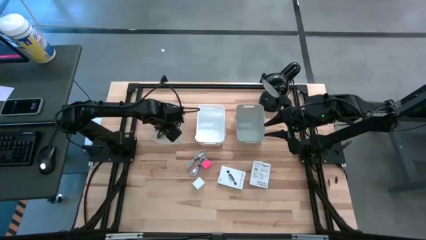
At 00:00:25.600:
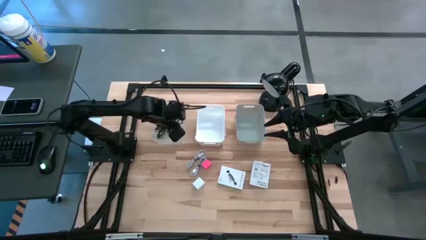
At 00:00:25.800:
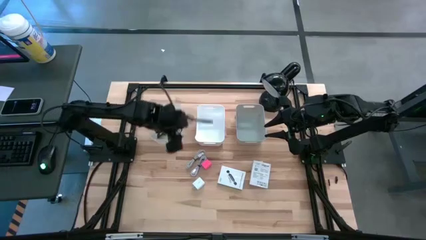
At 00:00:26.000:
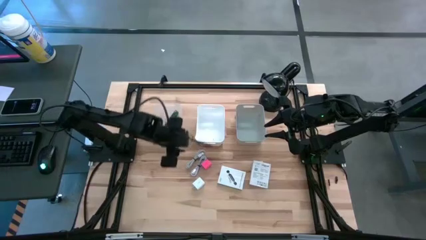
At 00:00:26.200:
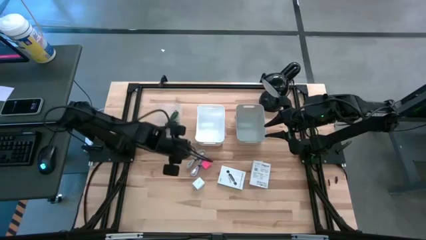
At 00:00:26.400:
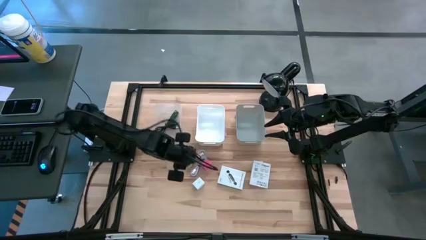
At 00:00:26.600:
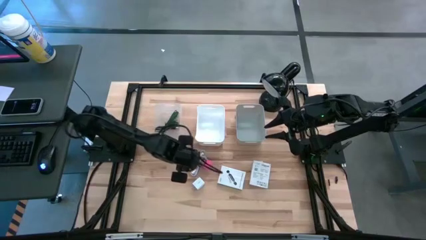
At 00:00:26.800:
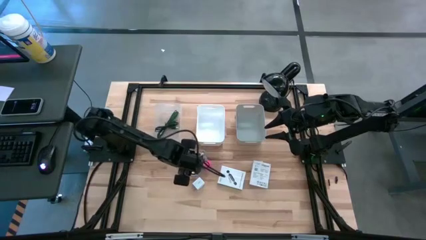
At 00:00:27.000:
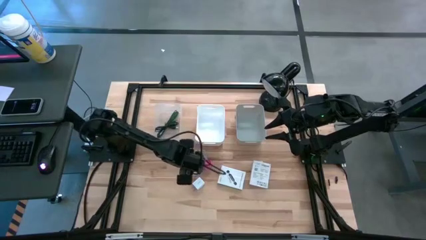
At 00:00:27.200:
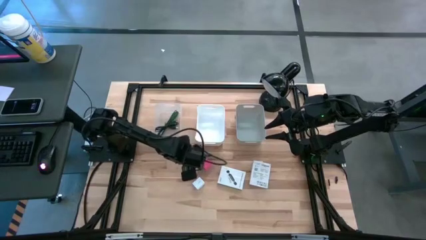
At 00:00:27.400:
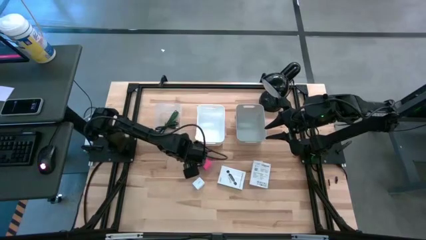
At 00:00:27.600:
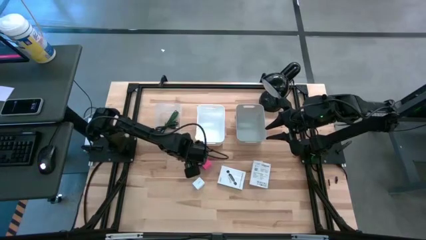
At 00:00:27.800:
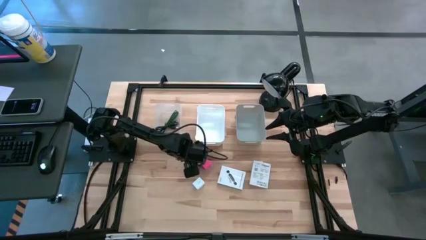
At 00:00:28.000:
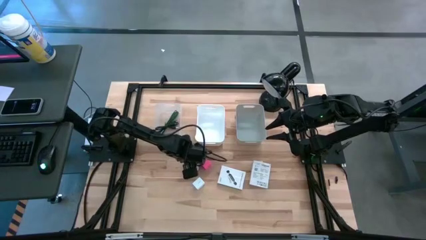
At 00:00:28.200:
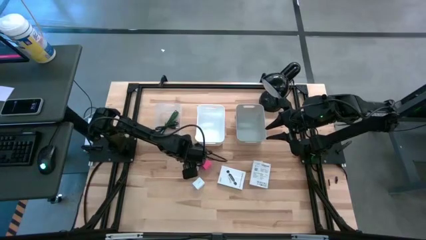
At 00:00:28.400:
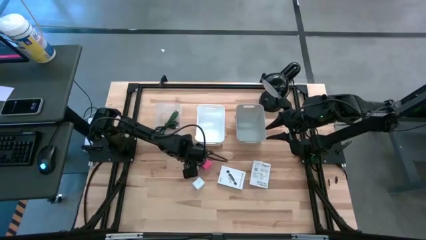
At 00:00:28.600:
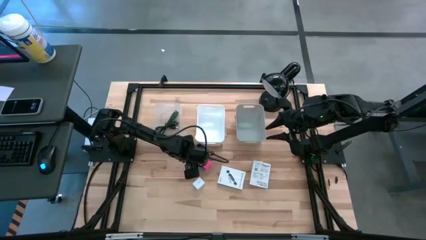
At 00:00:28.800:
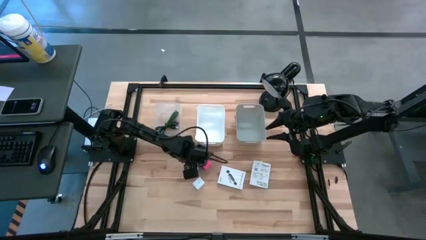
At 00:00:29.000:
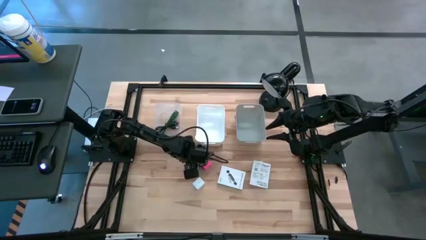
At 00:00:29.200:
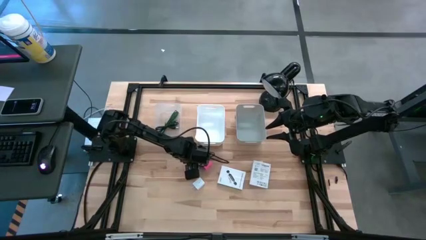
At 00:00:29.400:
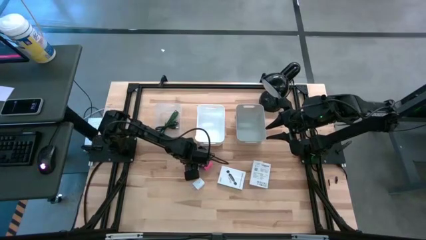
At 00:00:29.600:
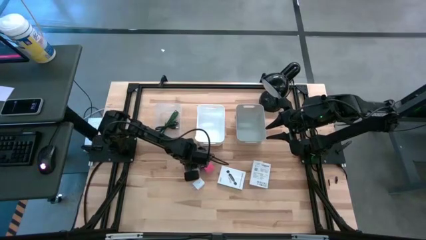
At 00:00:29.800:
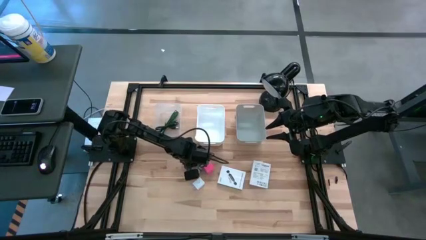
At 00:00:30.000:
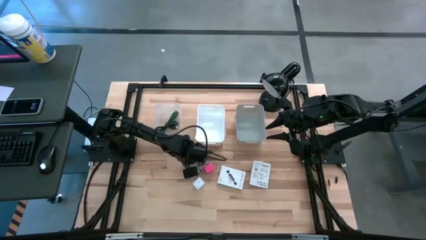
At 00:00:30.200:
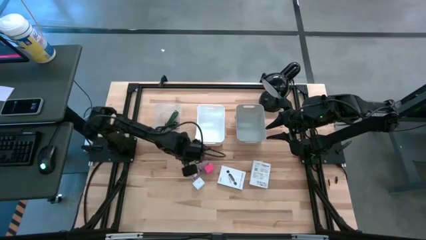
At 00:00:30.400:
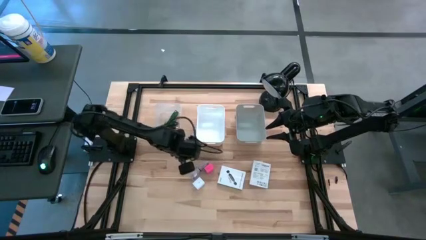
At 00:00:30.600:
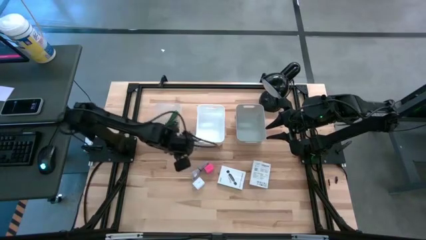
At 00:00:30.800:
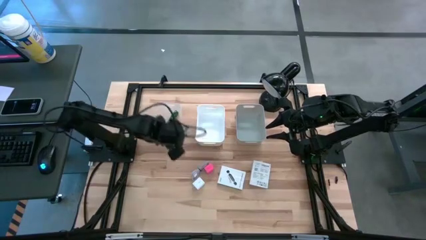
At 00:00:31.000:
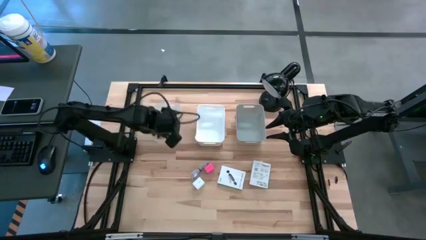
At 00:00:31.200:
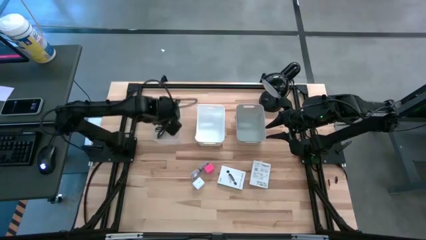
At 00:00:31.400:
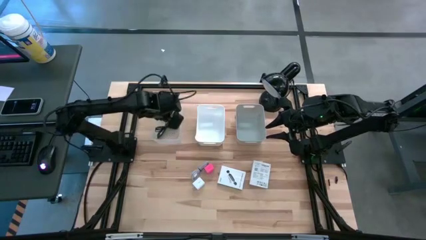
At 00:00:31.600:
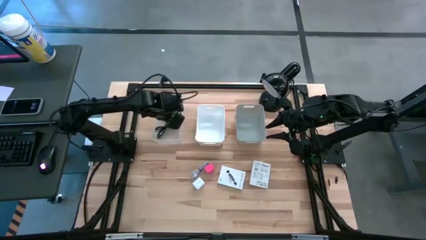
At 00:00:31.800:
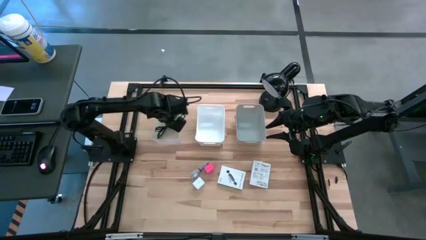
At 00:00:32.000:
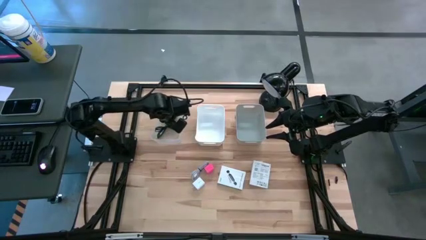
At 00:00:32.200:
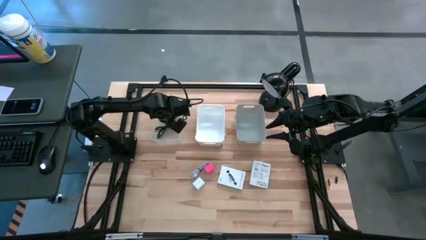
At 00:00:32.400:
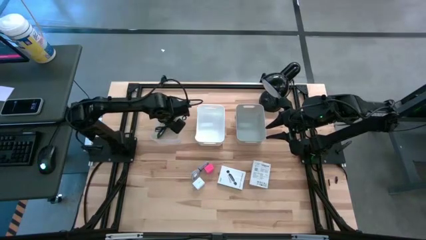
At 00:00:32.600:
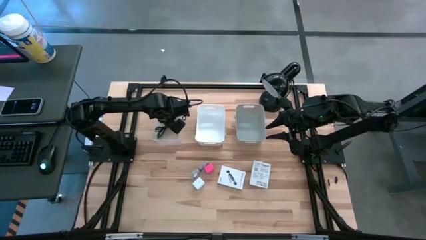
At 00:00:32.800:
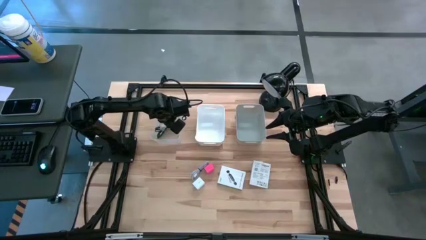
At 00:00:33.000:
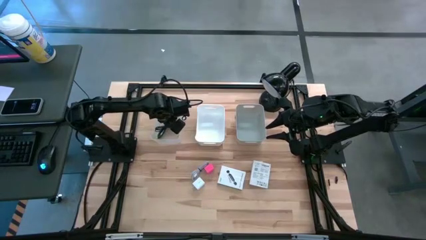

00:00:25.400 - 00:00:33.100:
Task: Pick and place items into bin
Put the white USB cord into the transparent bin

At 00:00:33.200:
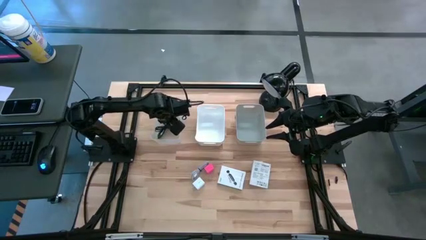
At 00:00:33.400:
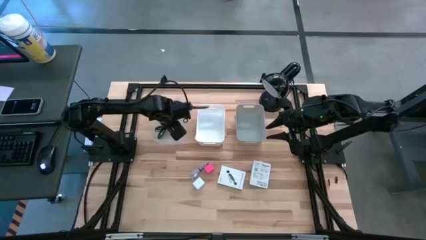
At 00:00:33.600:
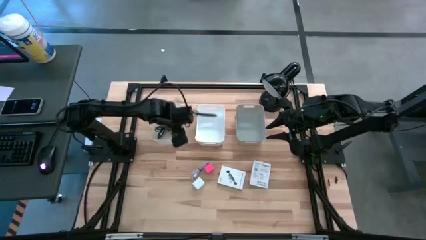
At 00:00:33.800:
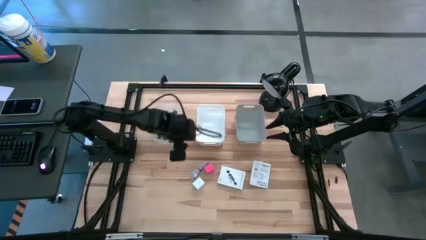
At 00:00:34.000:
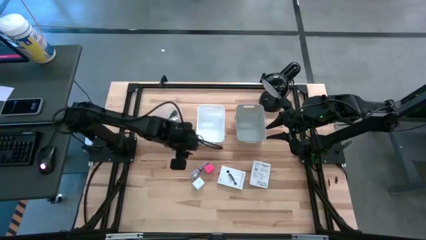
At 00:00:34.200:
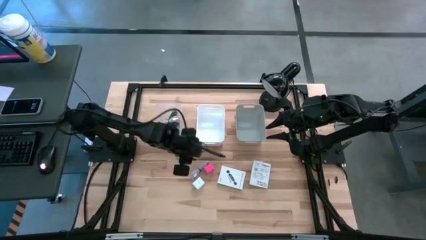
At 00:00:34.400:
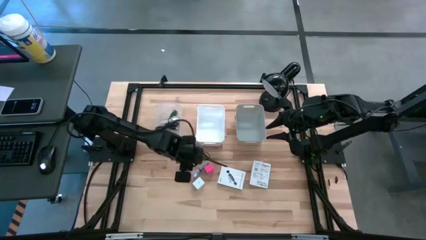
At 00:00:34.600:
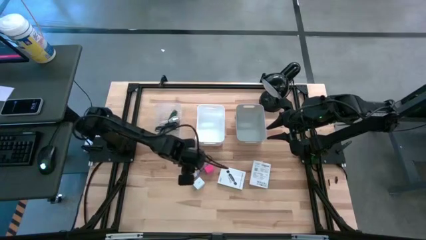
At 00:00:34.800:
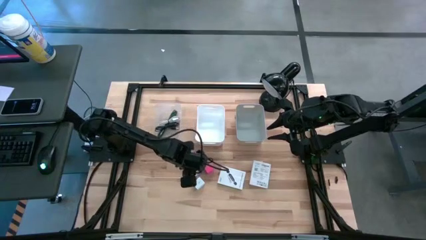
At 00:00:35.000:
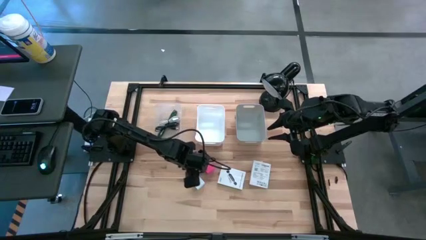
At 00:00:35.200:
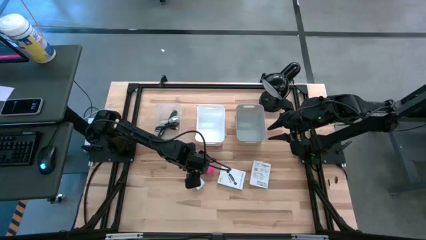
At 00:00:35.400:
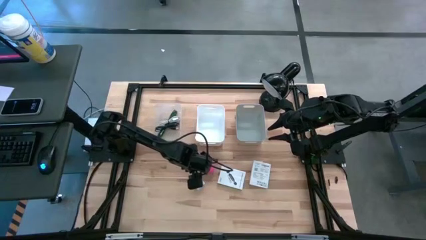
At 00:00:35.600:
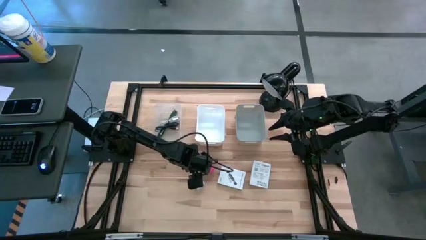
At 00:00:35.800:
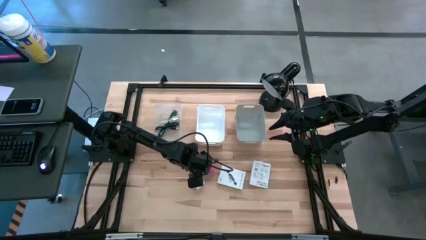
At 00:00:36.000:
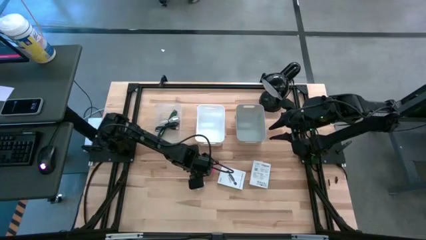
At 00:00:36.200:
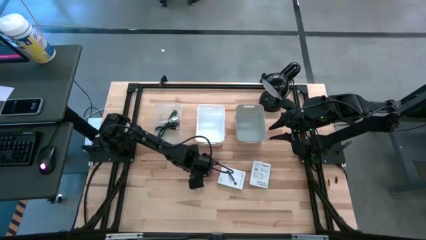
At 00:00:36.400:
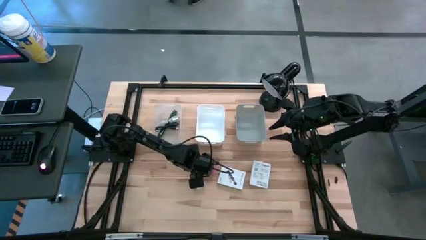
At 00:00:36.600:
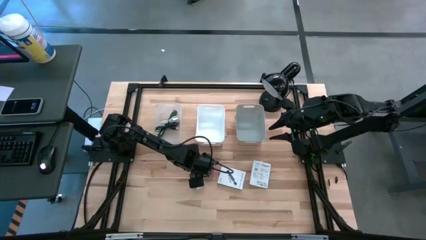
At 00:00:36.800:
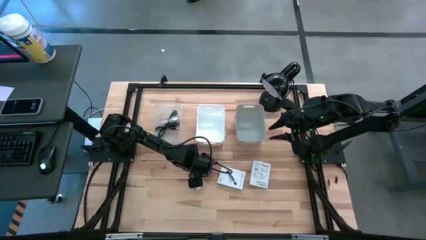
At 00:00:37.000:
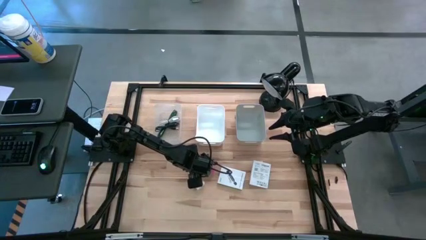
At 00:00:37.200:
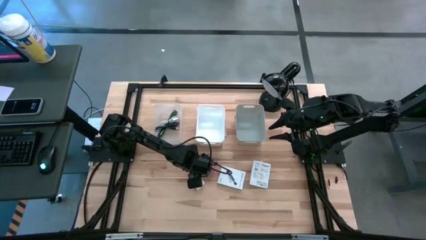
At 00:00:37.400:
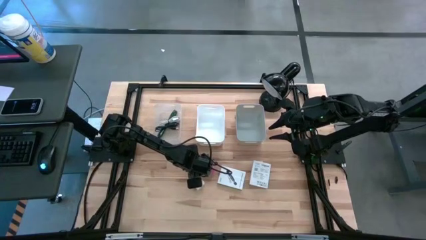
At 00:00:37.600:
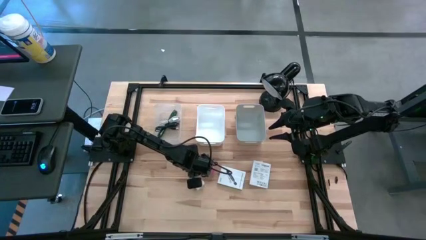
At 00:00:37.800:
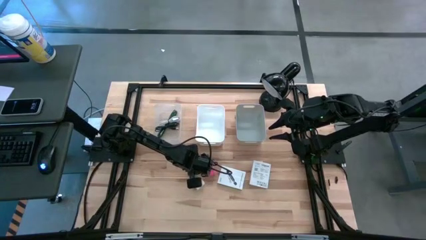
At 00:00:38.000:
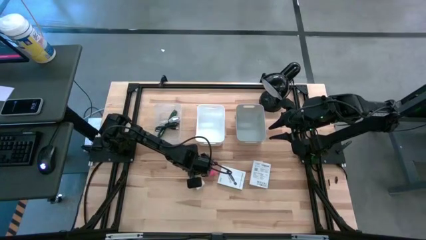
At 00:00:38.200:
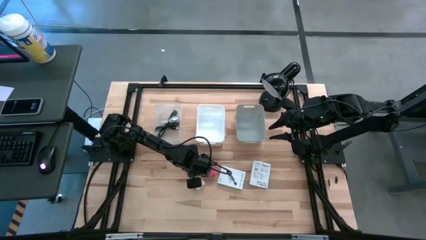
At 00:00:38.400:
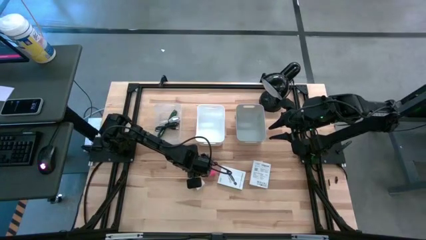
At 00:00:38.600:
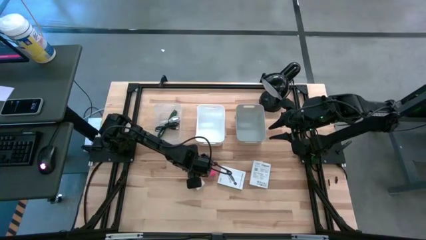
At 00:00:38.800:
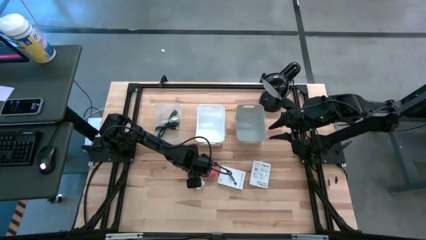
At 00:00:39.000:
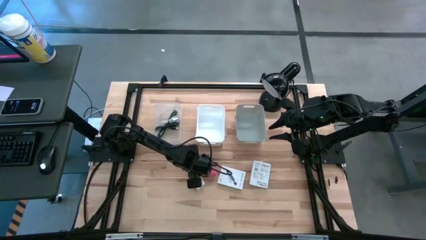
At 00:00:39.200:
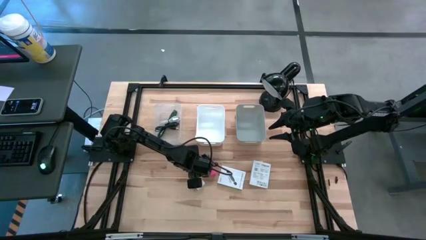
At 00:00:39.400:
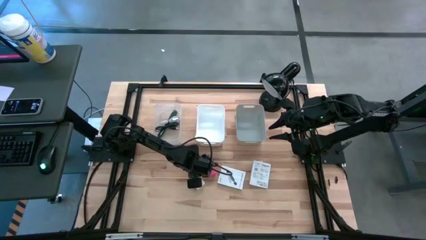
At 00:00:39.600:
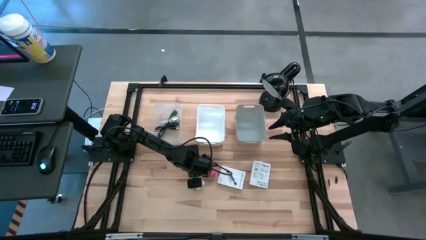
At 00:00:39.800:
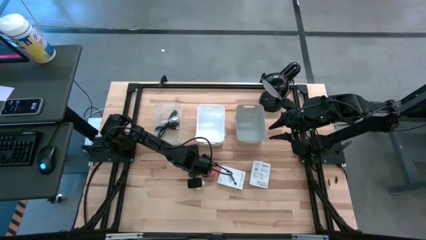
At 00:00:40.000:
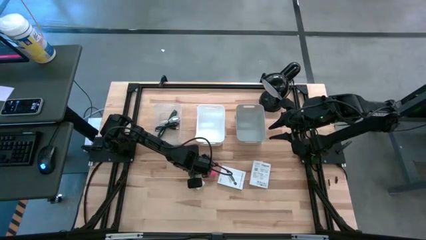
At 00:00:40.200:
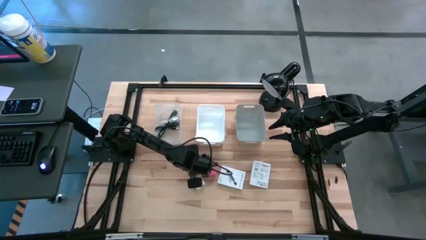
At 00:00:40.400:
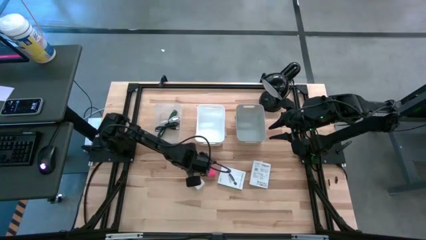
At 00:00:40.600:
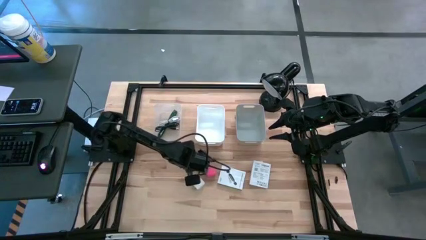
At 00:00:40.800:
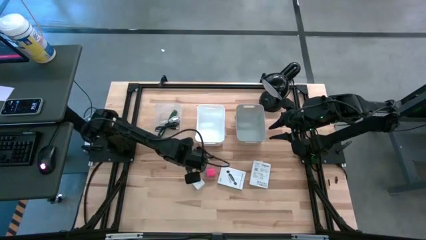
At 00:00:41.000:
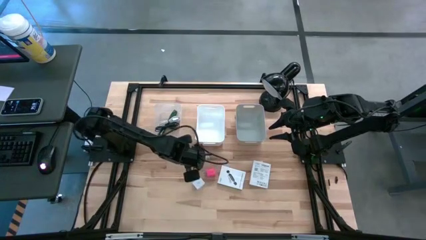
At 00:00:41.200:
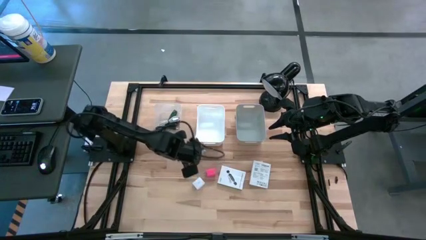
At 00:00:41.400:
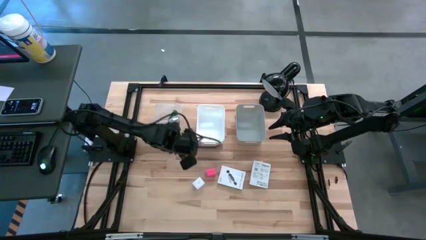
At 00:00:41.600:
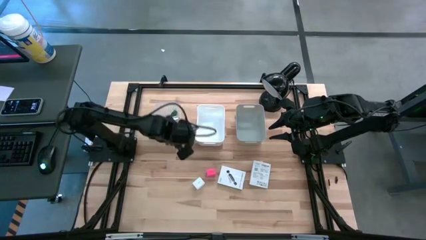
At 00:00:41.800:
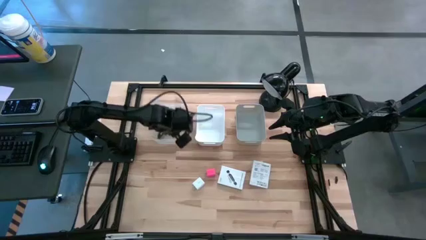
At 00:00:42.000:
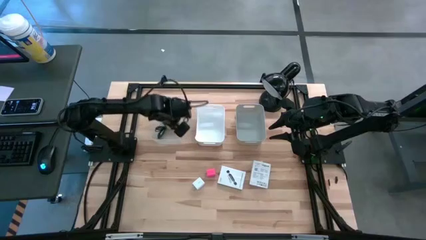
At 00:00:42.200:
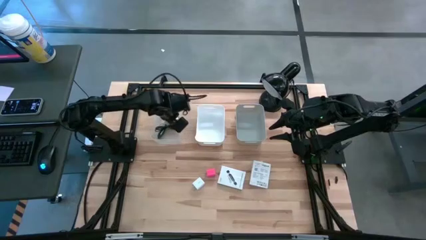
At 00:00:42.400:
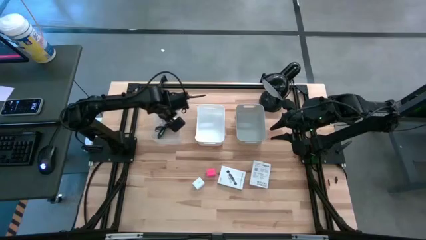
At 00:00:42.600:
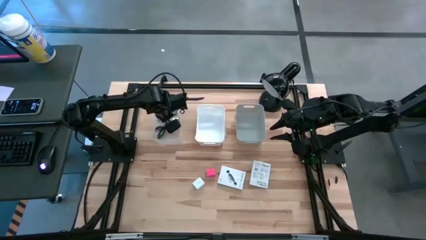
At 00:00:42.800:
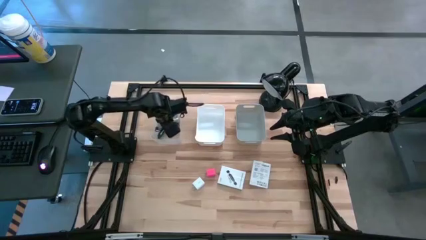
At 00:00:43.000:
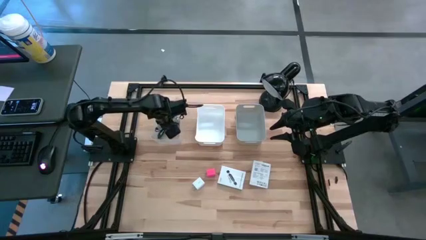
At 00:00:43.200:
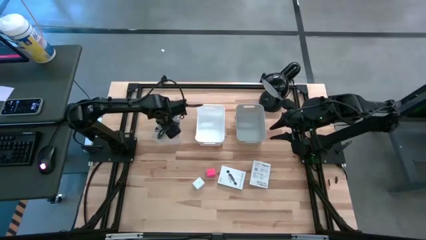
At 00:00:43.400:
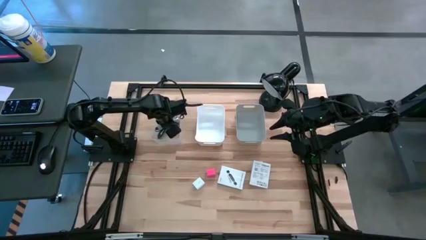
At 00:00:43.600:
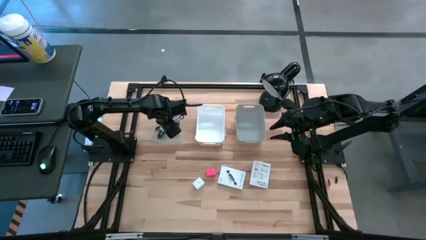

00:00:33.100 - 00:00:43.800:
Put the purple USB cord into the transparent bin
